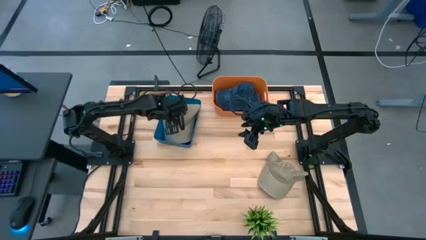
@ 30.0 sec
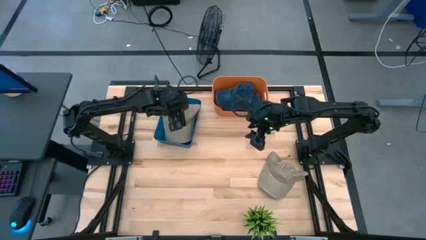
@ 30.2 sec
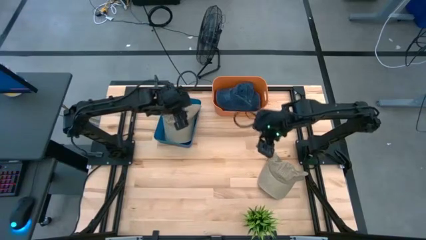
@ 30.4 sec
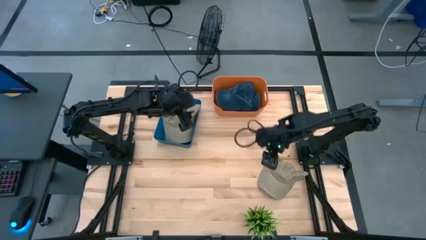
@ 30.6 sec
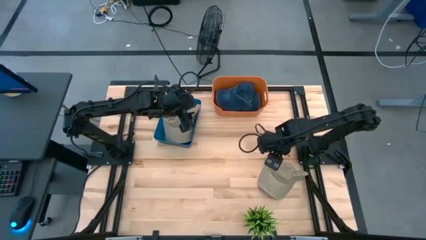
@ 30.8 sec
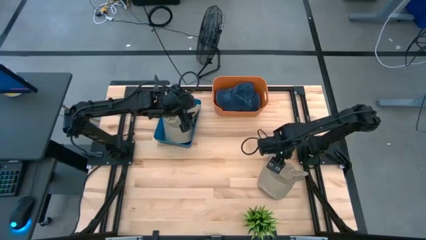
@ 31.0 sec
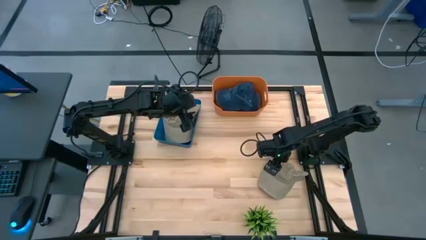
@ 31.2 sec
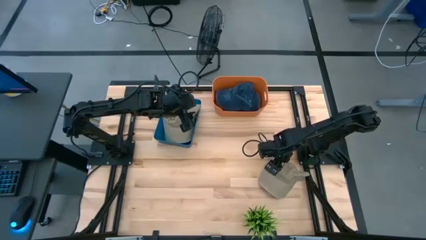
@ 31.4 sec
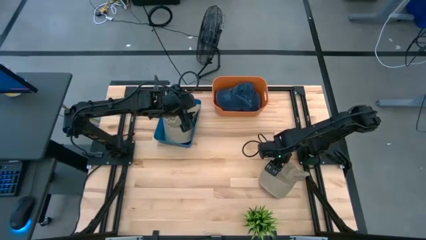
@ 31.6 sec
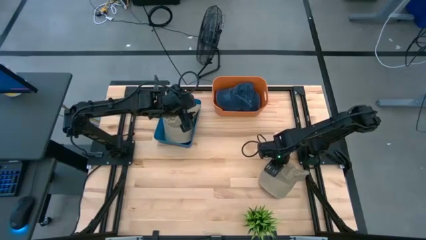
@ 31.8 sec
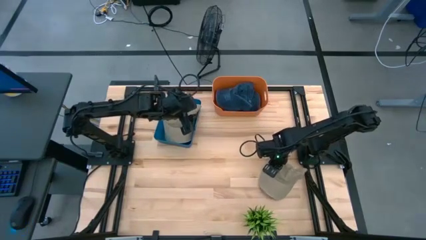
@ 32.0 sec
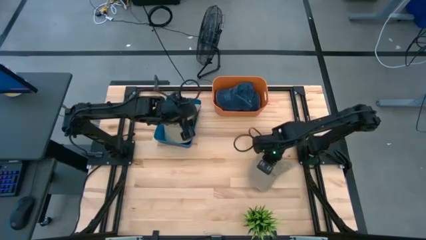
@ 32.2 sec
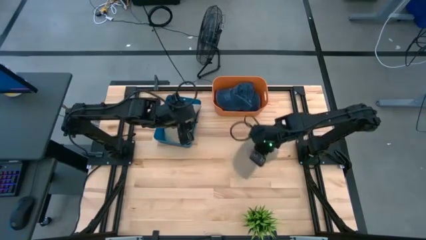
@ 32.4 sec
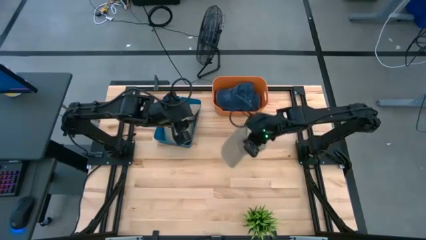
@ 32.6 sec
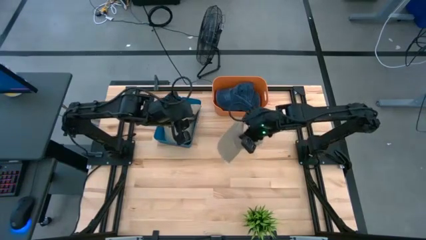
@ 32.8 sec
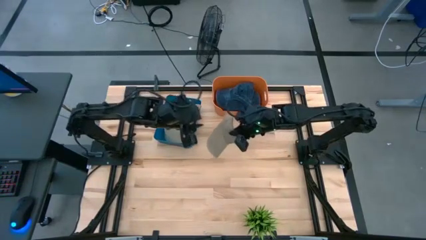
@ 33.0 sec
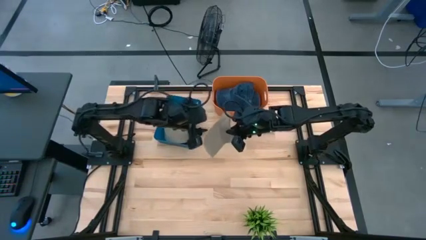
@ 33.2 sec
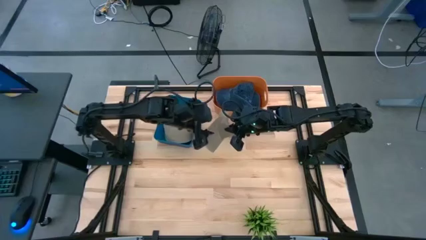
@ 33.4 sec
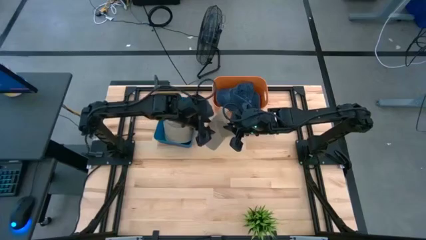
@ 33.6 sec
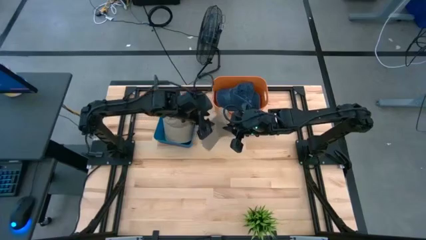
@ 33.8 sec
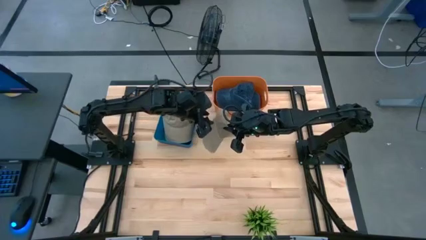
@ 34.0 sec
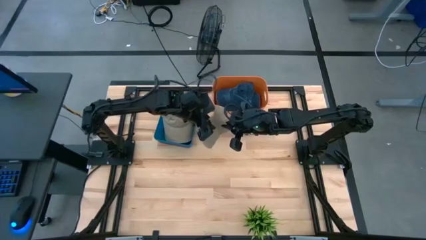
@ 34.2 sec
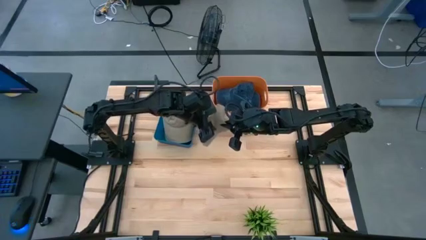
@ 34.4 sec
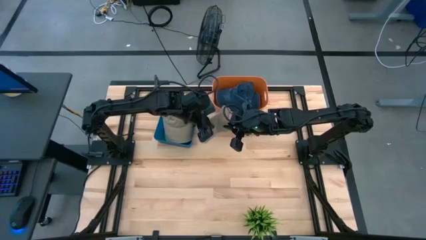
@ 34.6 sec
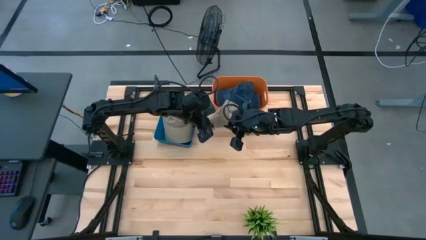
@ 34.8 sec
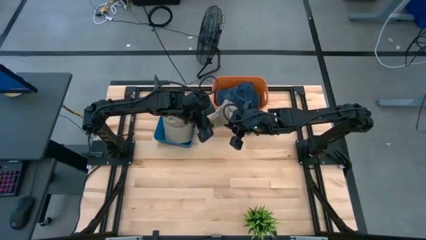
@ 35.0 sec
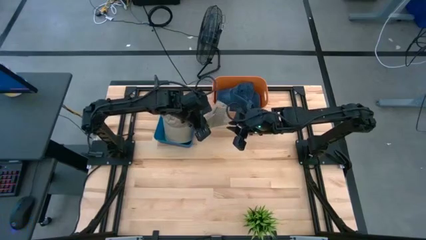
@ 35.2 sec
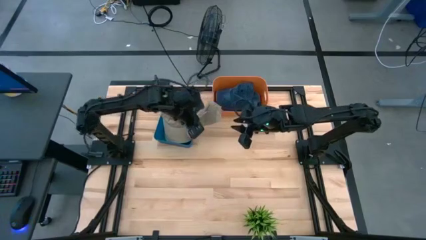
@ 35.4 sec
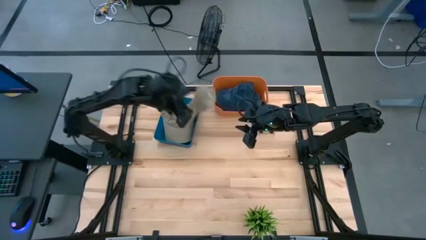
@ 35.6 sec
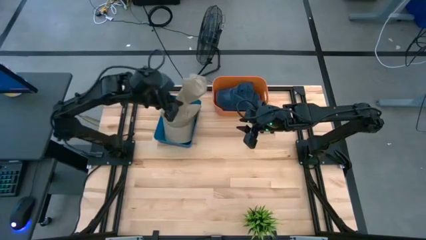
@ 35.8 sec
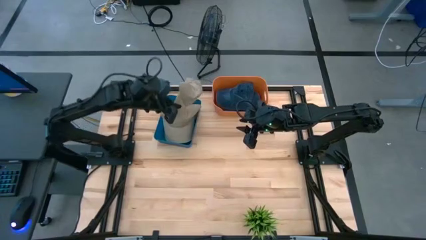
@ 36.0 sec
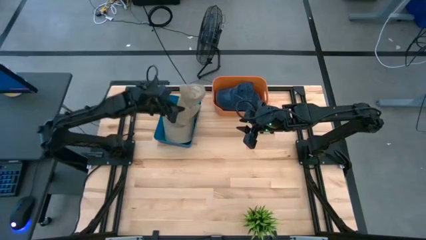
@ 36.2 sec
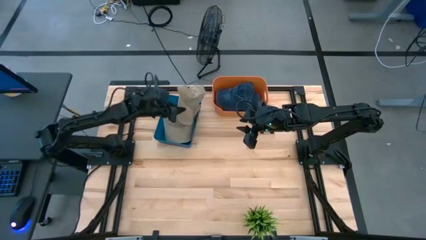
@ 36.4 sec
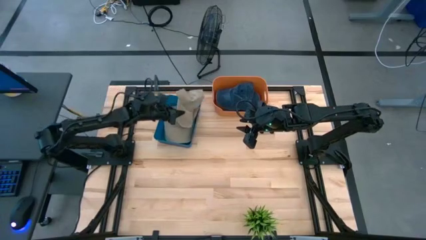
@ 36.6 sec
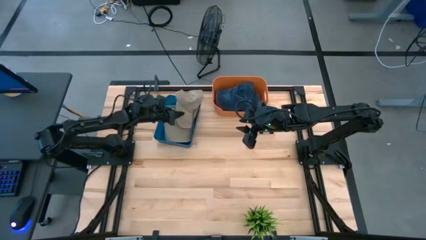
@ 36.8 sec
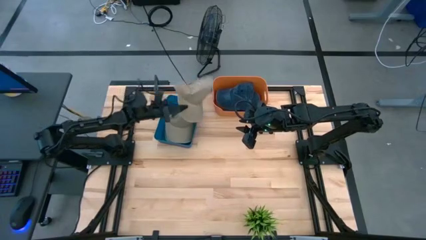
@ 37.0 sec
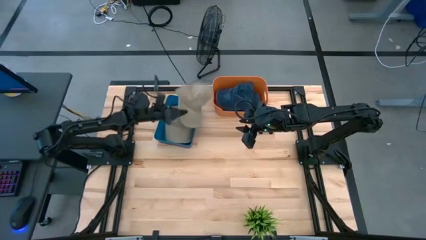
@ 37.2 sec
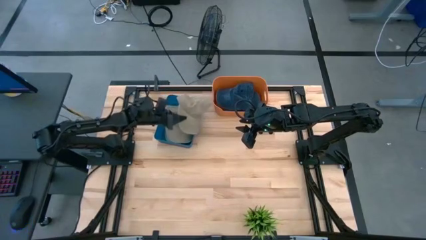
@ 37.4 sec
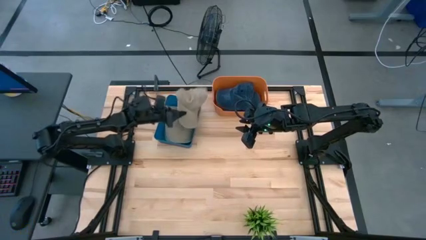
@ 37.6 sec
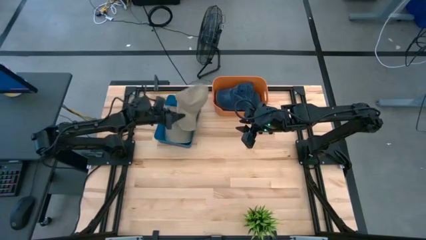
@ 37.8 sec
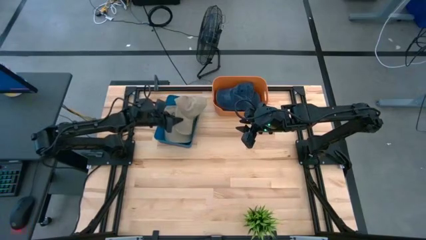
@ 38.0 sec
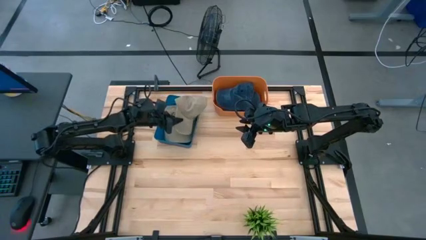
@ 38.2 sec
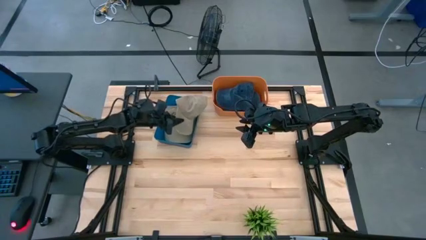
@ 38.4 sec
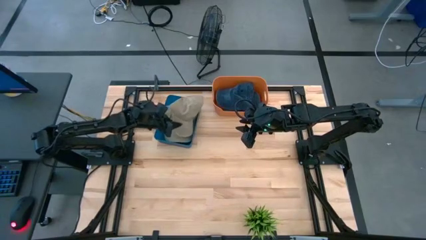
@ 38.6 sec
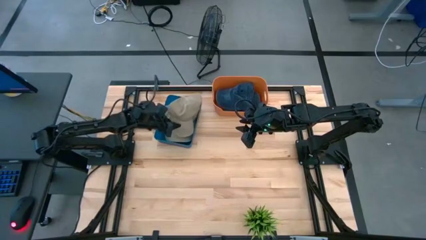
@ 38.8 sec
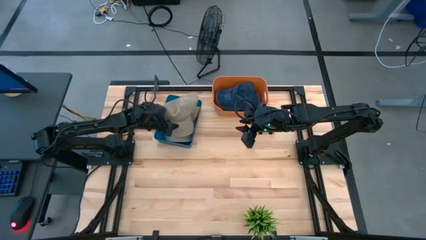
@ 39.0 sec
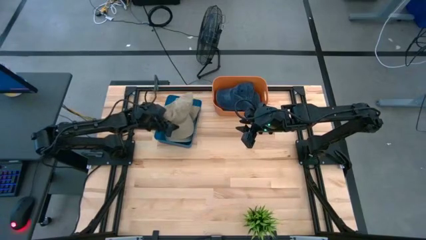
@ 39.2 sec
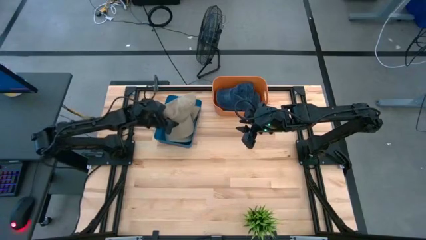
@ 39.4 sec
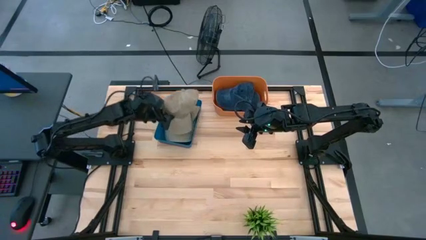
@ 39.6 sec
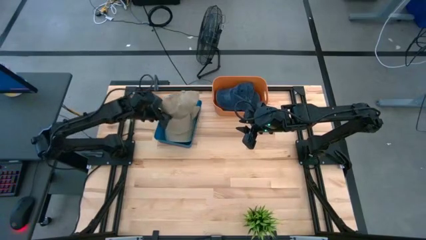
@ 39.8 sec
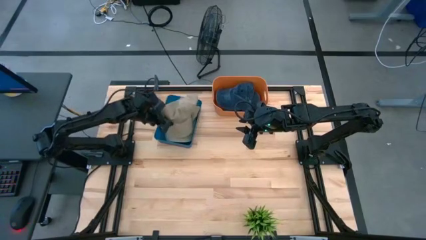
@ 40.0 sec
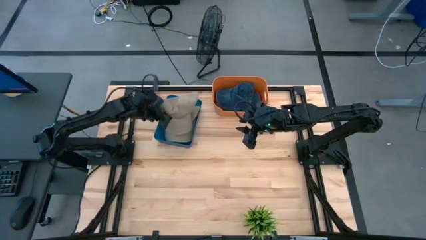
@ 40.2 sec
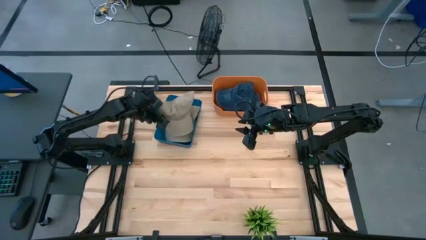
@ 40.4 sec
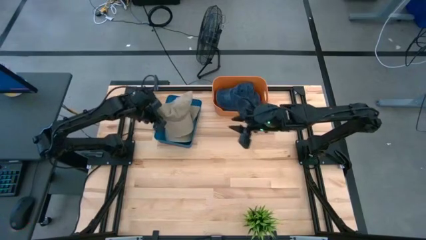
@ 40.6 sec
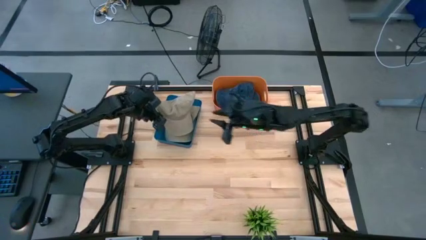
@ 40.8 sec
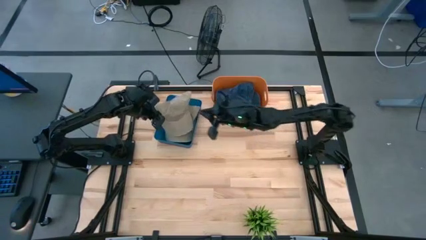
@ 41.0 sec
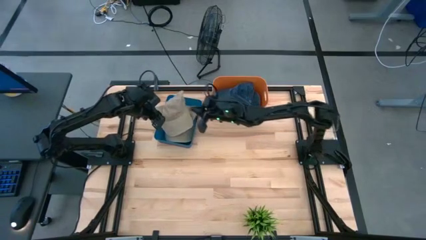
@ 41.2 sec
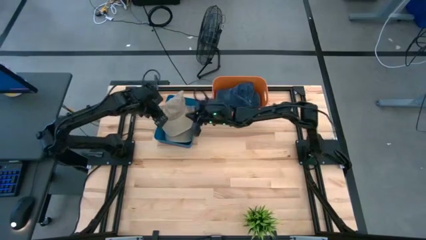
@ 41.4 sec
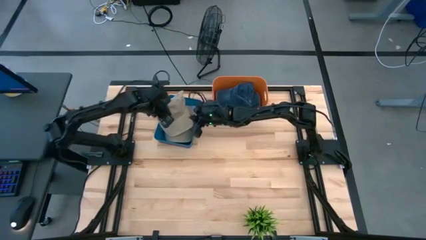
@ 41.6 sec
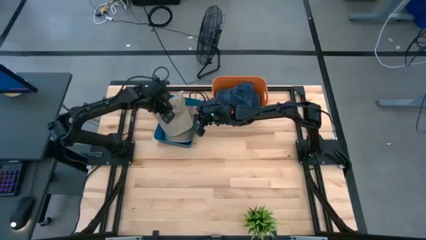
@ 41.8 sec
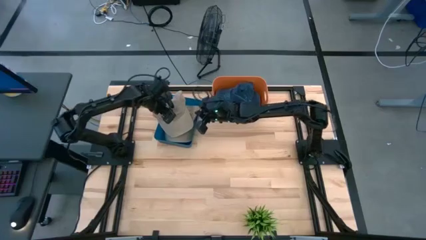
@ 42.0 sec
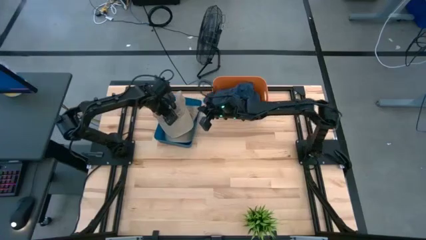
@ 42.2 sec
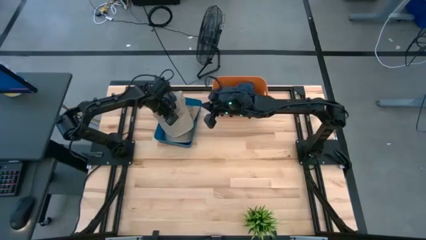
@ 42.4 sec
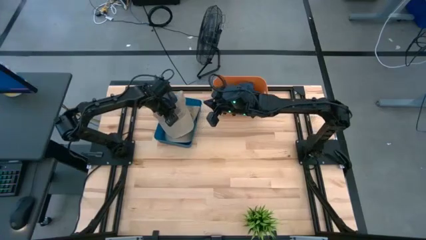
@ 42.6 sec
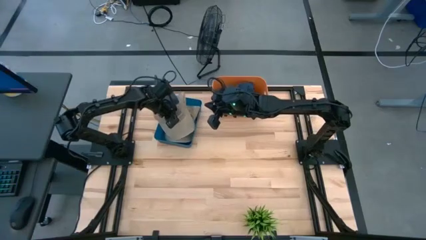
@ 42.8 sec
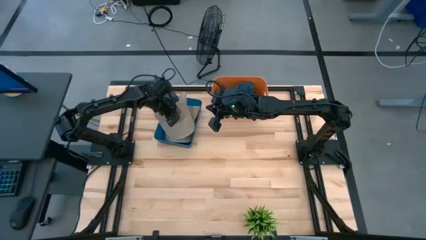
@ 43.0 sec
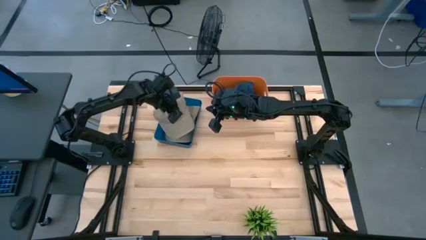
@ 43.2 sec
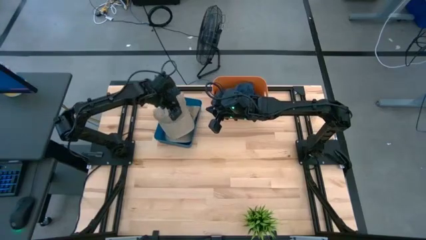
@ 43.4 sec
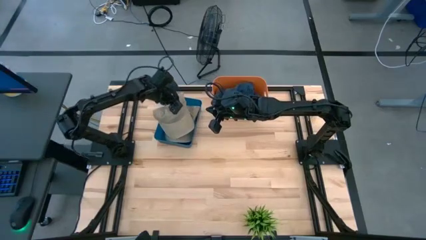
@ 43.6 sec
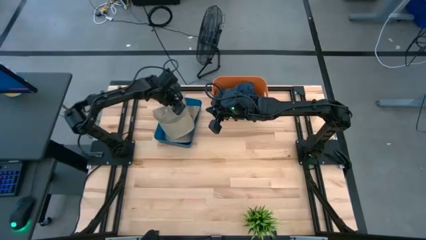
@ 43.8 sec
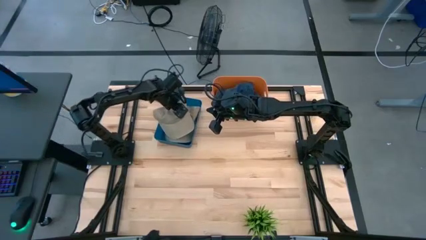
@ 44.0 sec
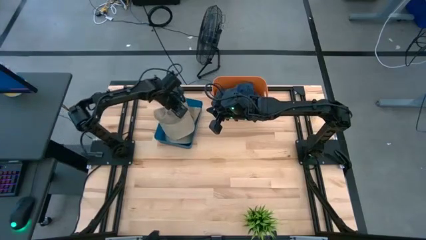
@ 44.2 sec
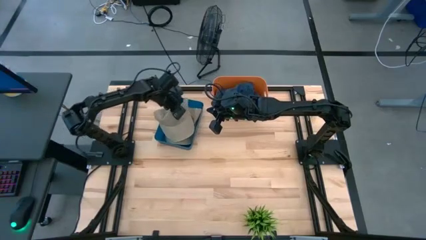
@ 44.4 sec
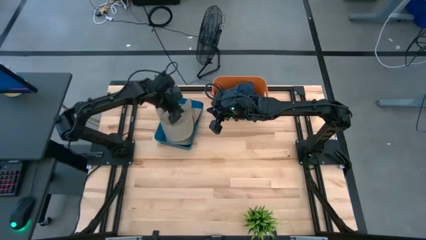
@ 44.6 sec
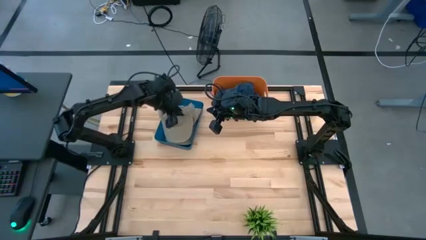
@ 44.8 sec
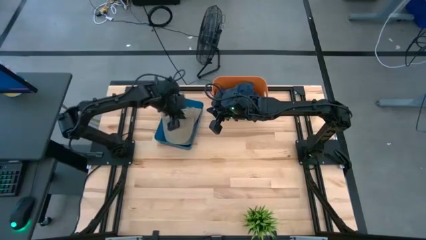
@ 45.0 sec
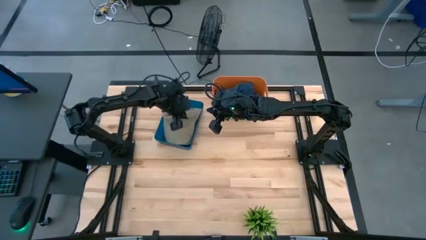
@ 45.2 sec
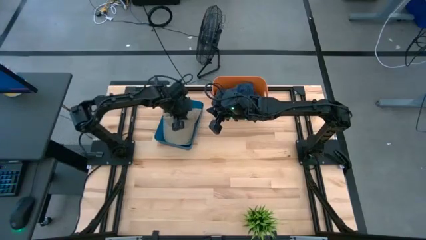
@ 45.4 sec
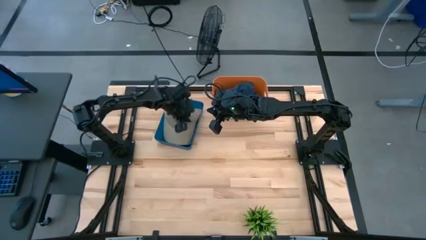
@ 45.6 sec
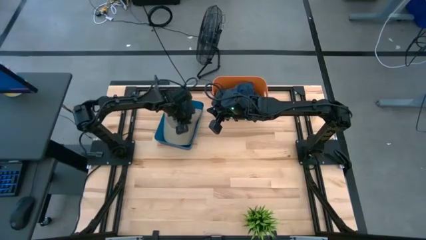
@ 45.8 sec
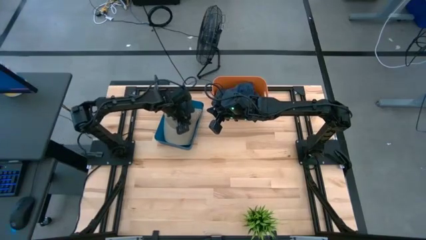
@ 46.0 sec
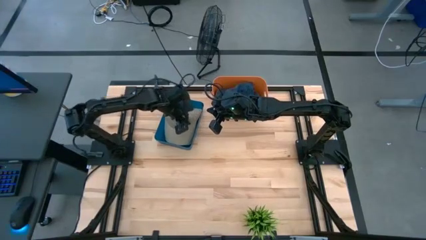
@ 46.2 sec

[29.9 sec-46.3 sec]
Task: Pick & Place hat
Put the brown cap into the blue bin
